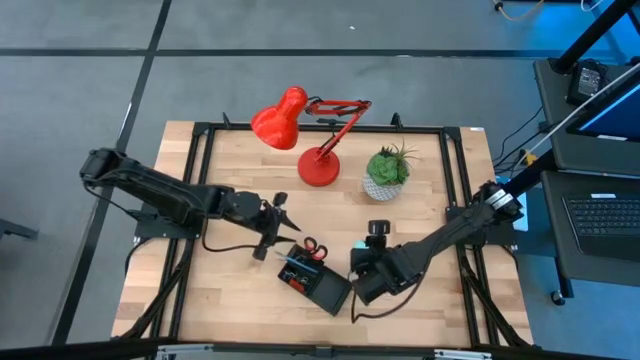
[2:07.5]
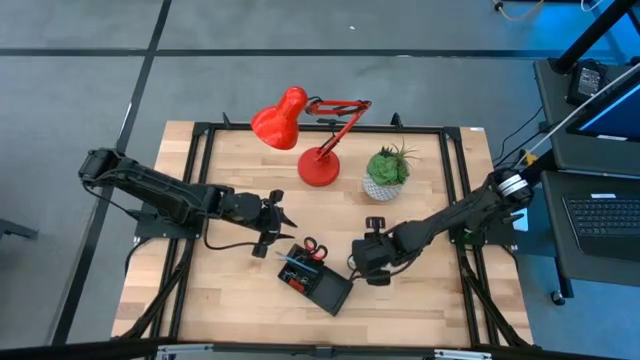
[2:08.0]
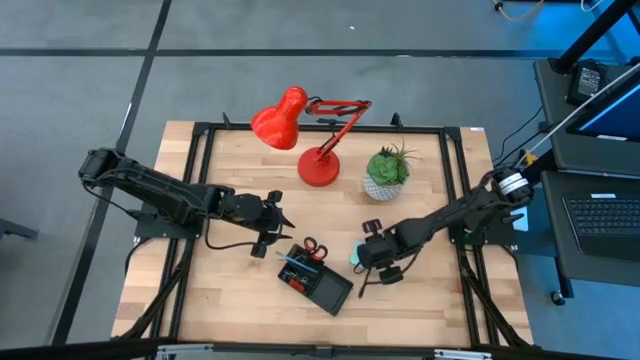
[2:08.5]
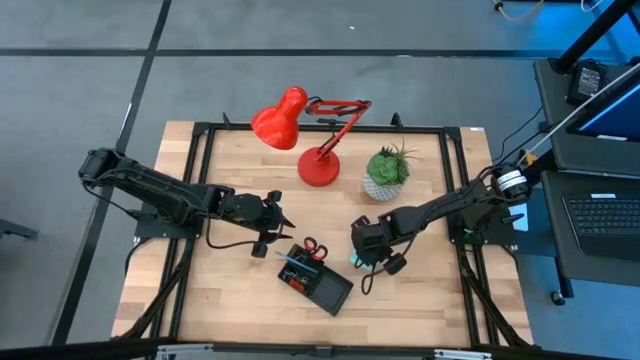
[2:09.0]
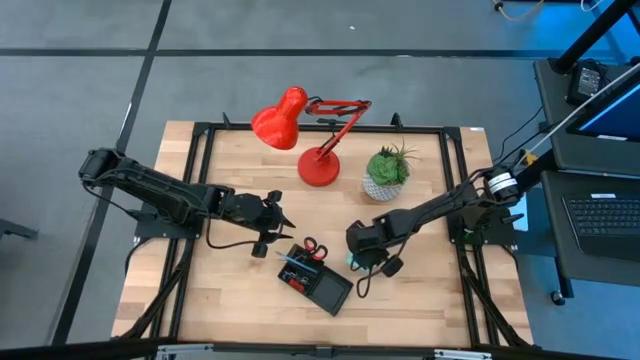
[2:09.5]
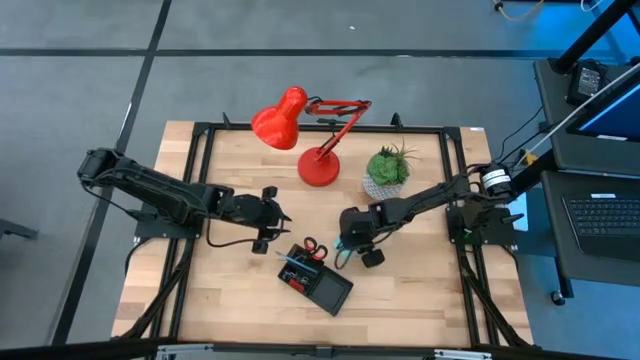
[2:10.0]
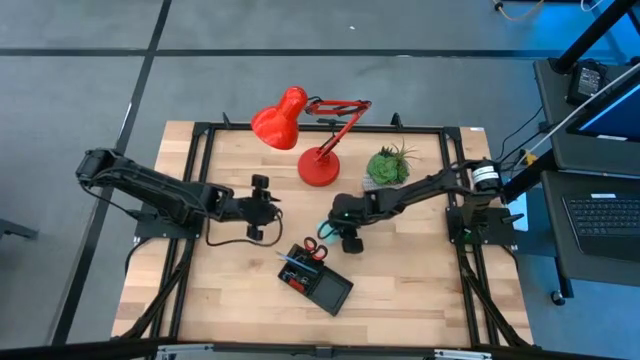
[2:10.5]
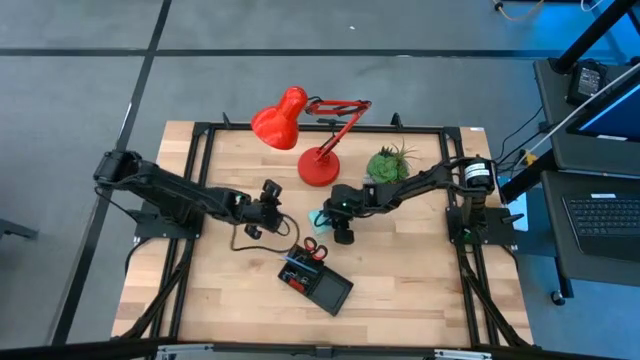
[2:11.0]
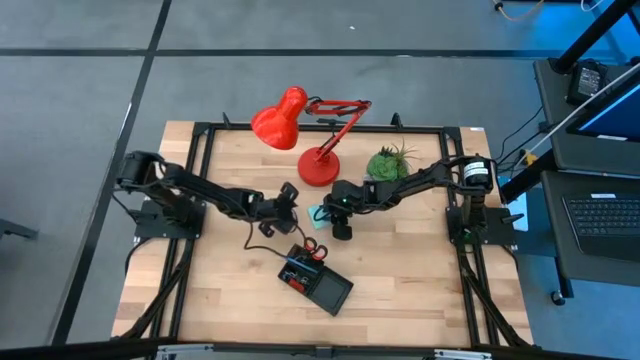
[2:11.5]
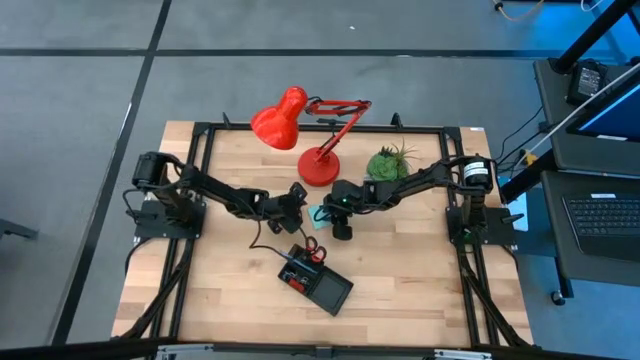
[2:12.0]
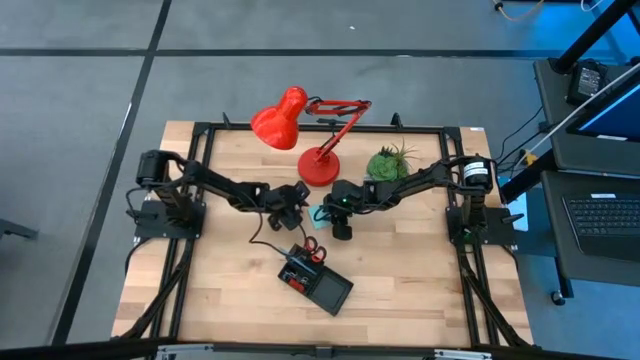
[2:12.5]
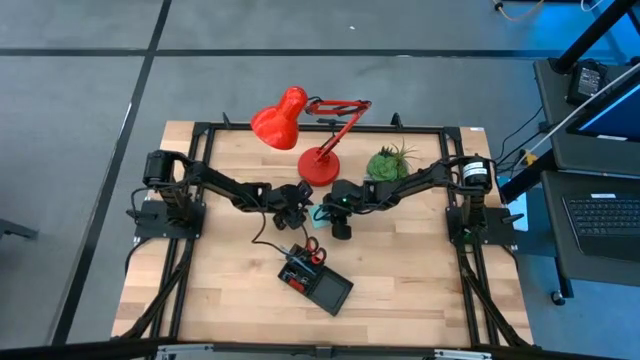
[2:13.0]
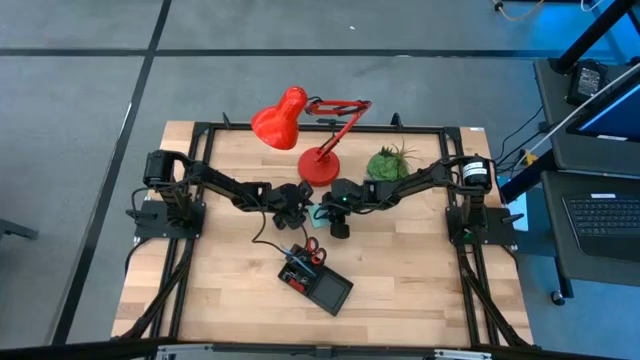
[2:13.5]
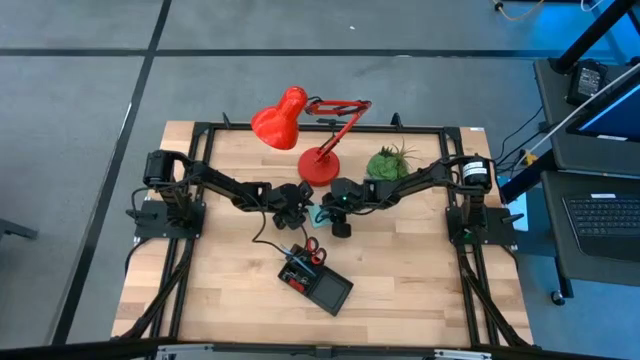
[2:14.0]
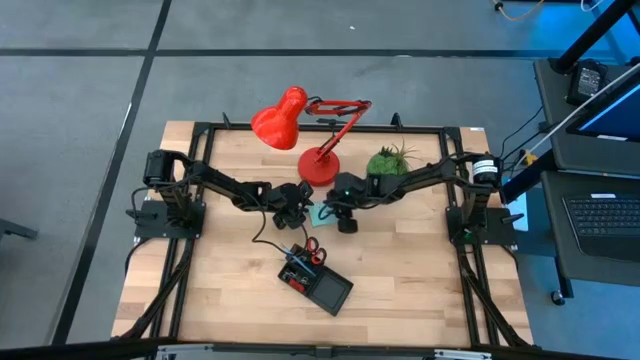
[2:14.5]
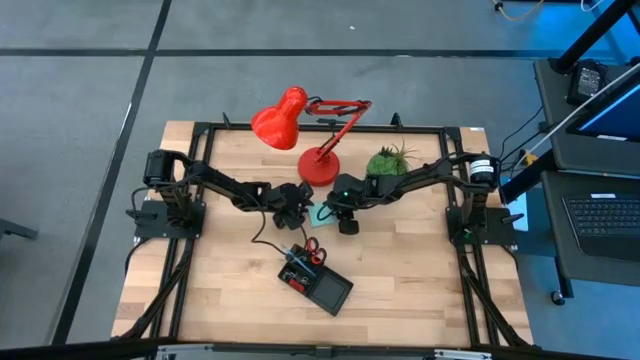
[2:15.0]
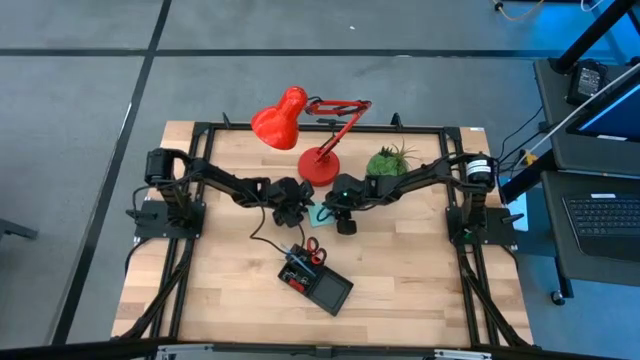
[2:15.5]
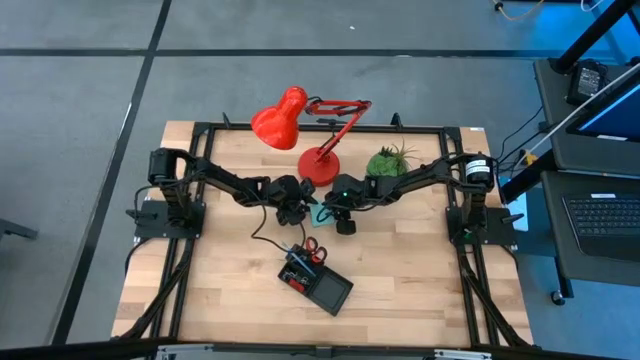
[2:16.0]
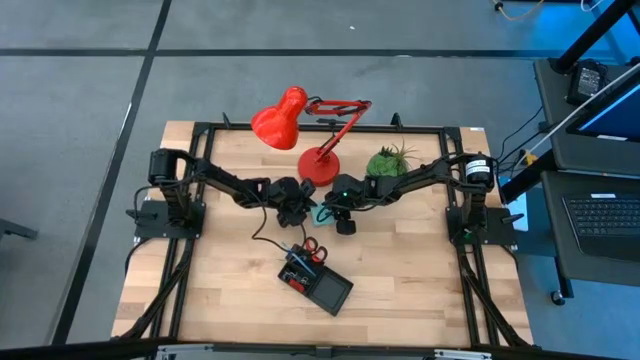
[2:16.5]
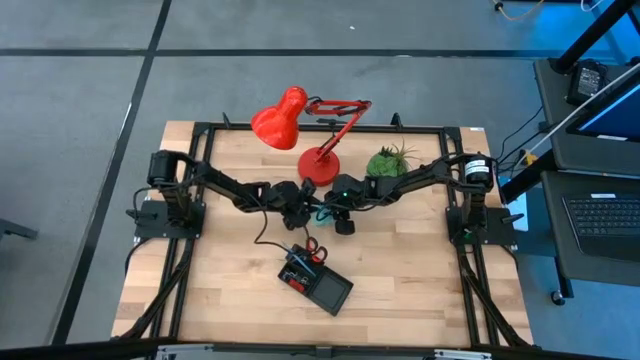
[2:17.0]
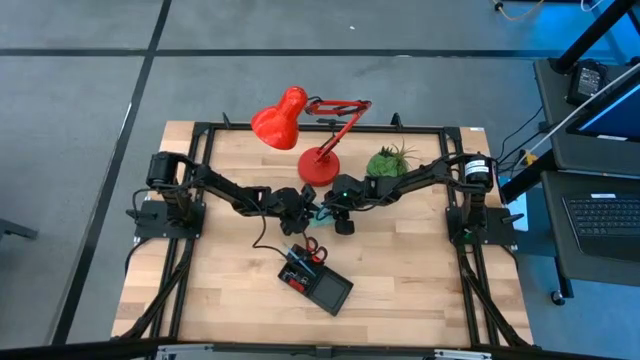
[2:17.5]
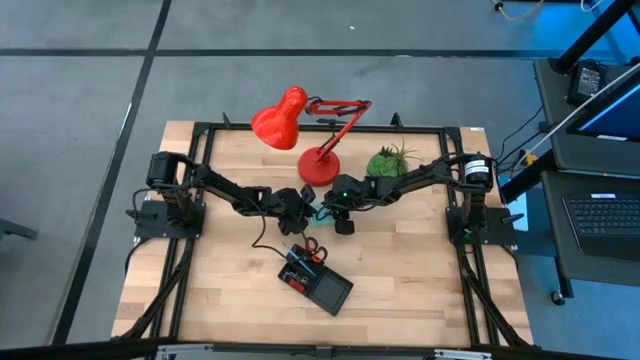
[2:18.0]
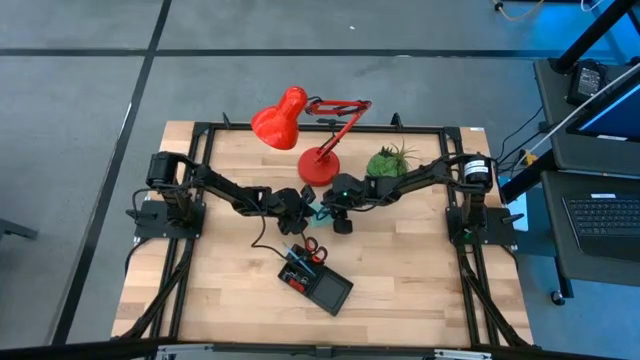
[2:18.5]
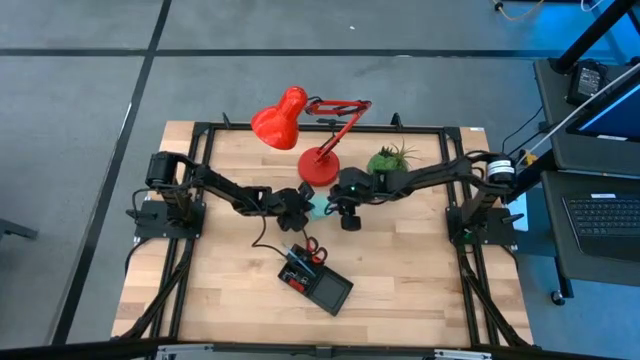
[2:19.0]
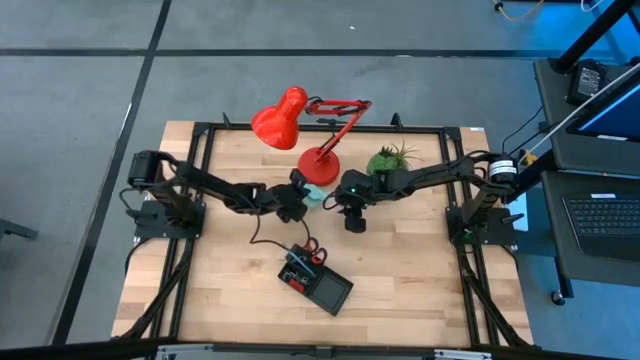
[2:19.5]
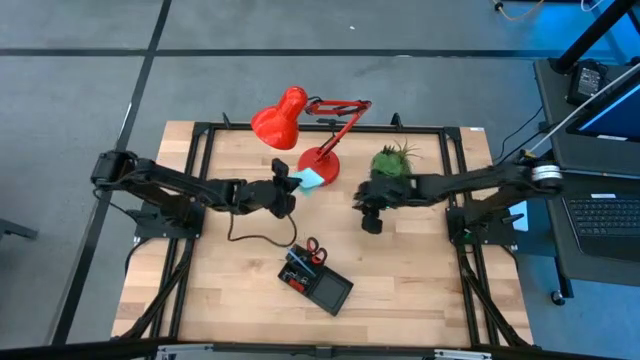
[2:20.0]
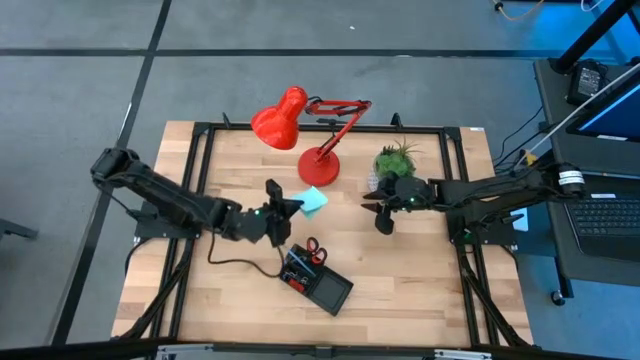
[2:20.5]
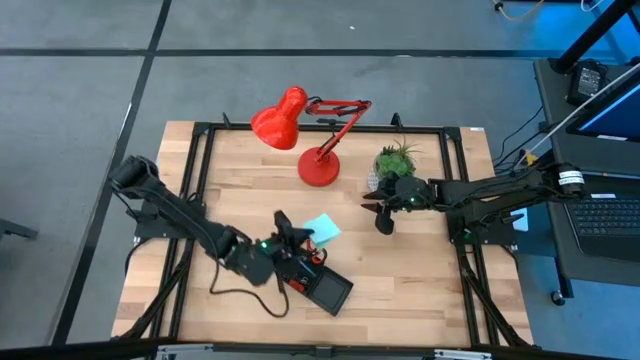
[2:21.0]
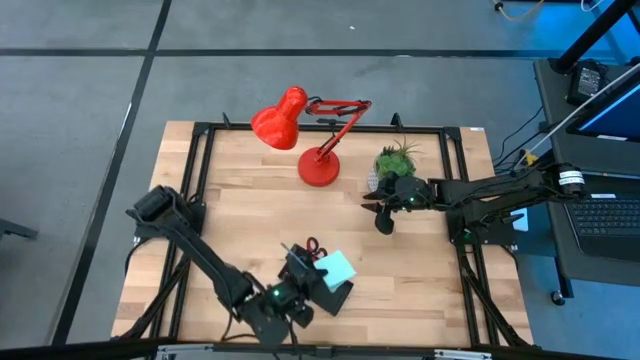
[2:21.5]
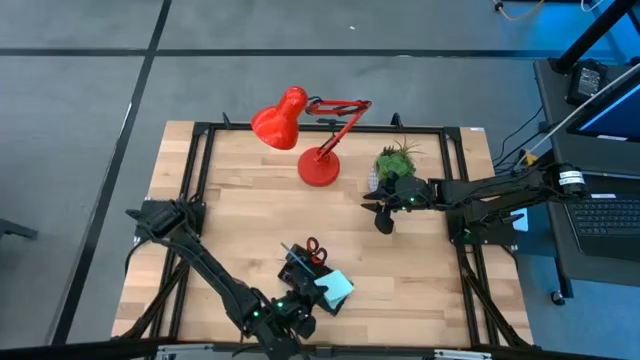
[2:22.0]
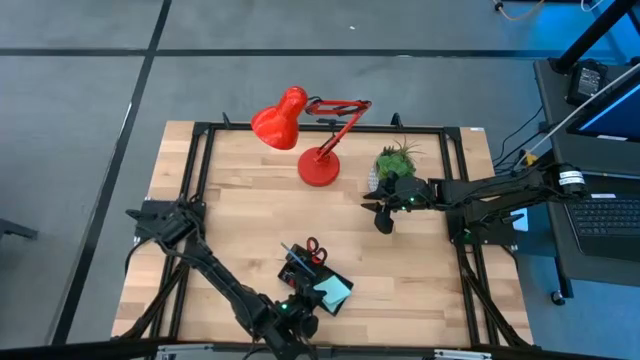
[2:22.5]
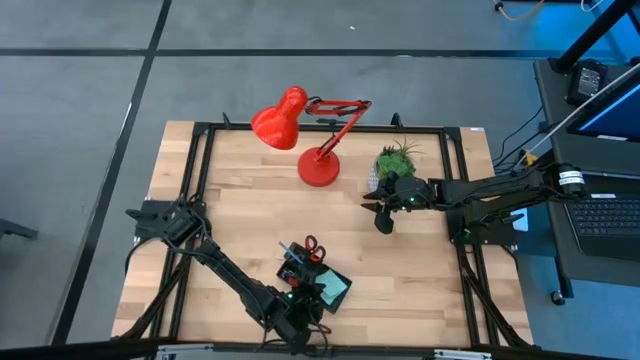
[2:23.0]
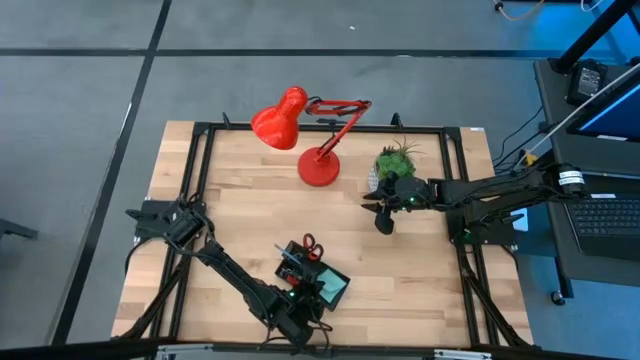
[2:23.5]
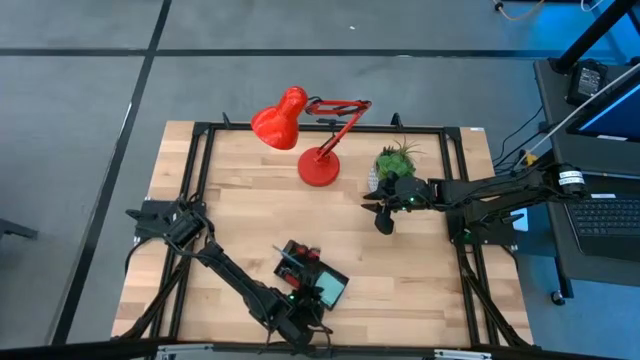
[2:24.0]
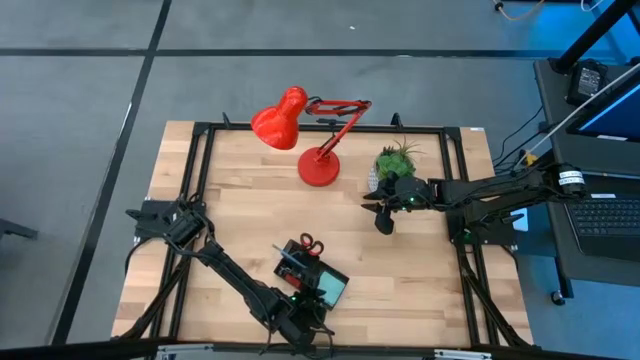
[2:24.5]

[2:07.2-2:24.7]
Task: Pick and place office supplies into organizer
Put the blue notepad into the black desk organizer

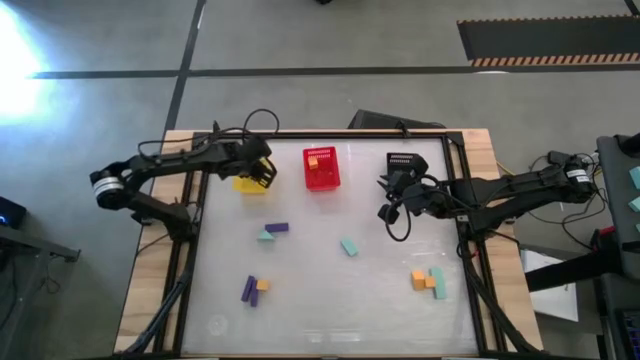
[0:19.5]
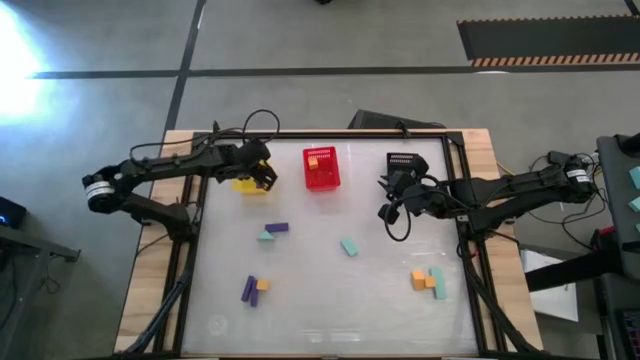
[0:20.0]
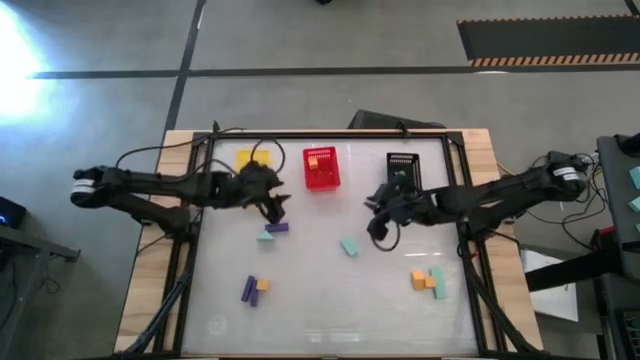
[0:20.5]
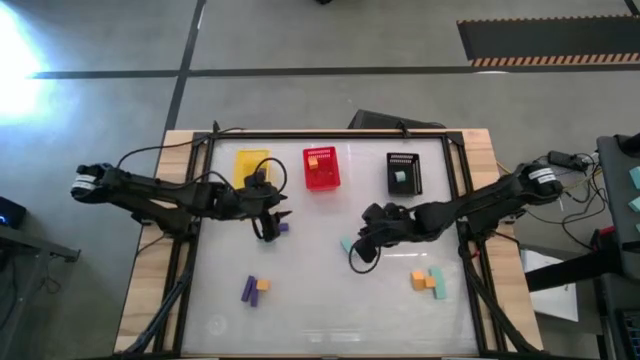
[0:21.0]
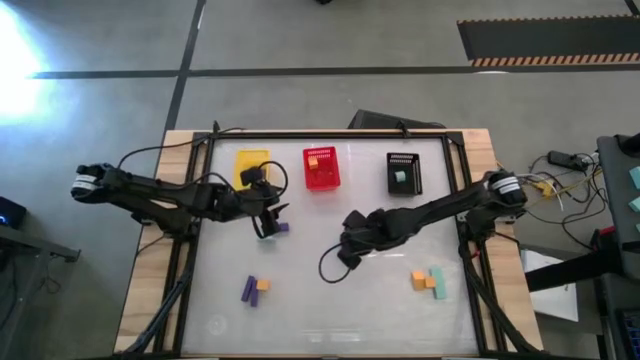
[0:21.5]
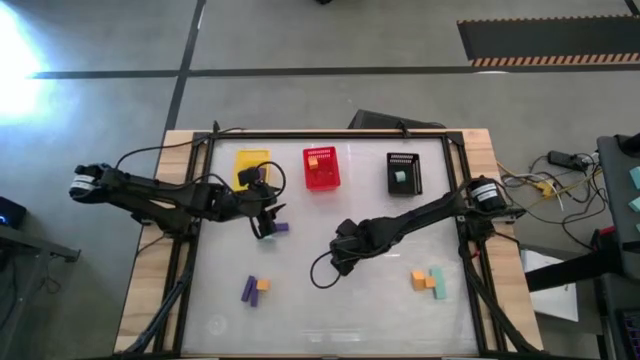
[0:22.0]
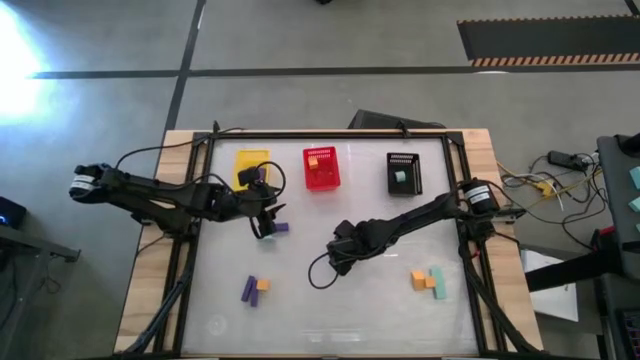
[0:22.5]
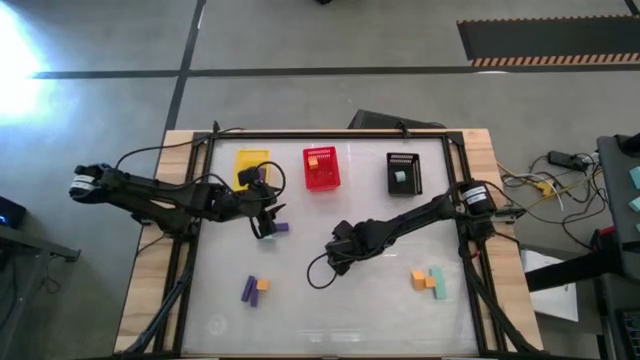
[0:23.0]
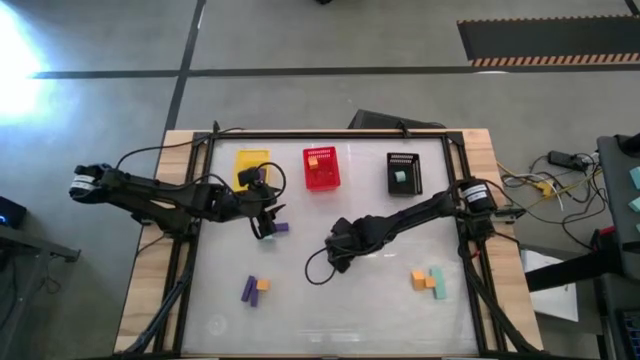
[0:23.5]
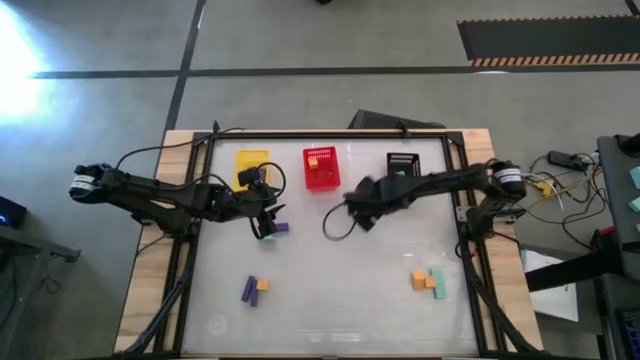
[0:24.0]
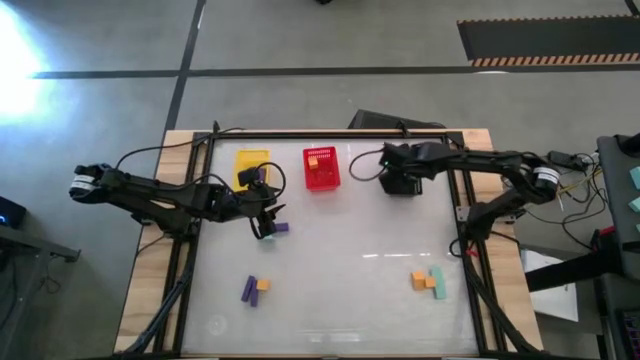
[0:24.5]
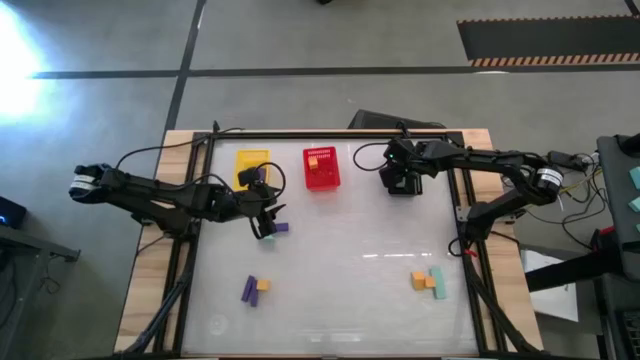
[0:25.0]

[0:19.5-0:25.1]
Task: Sort & place blocks by color
Put the blue block into the black bin
